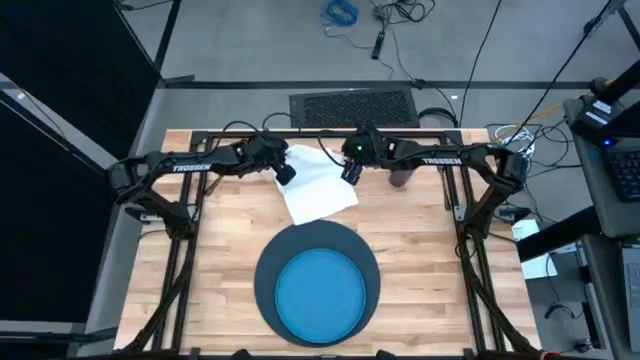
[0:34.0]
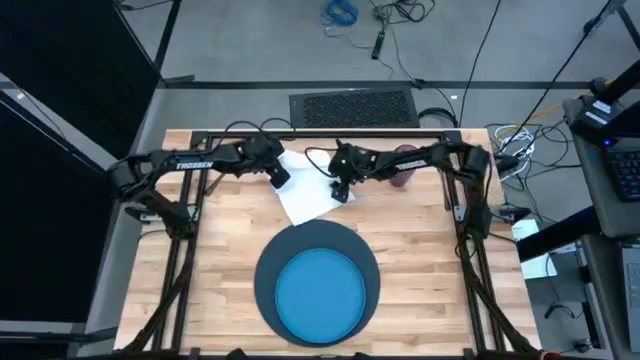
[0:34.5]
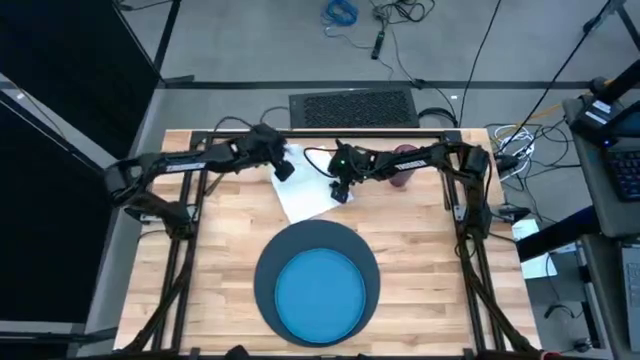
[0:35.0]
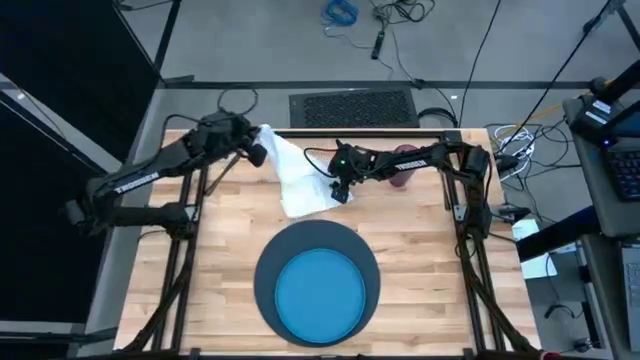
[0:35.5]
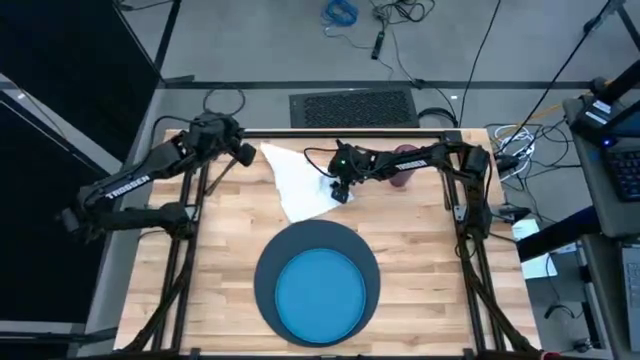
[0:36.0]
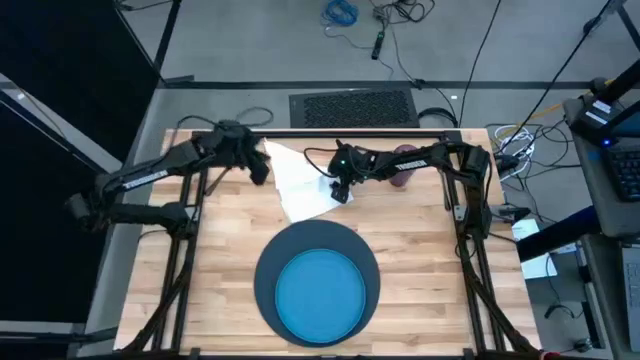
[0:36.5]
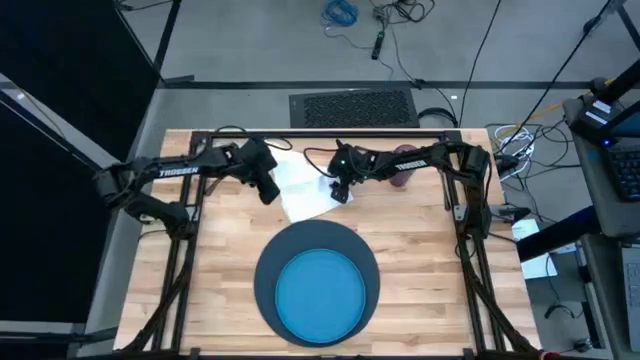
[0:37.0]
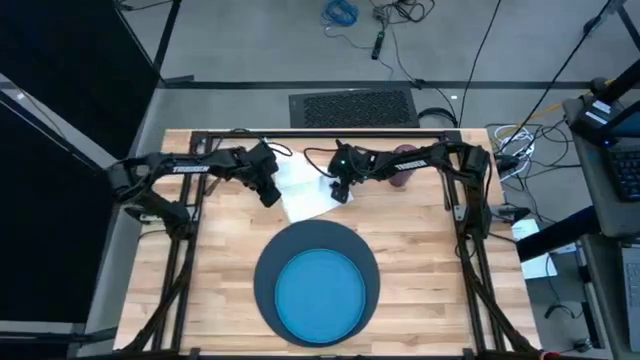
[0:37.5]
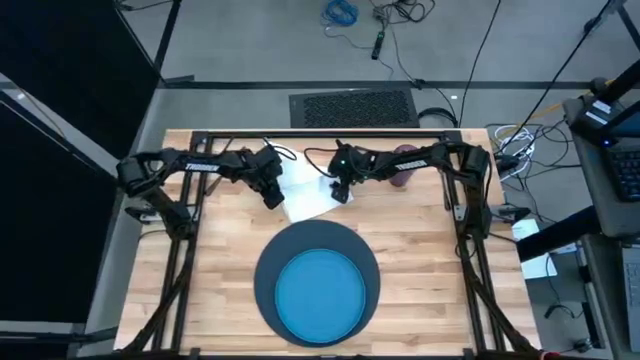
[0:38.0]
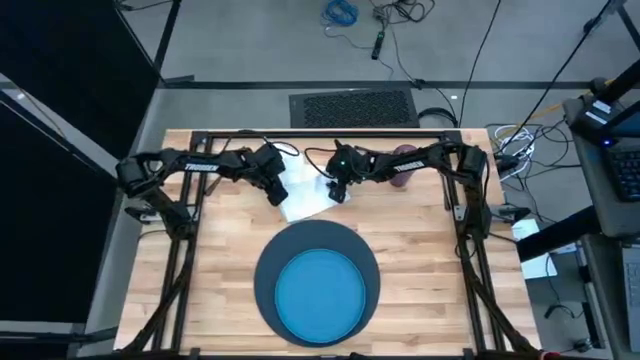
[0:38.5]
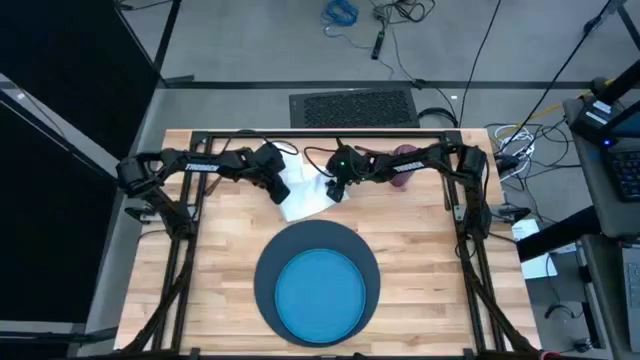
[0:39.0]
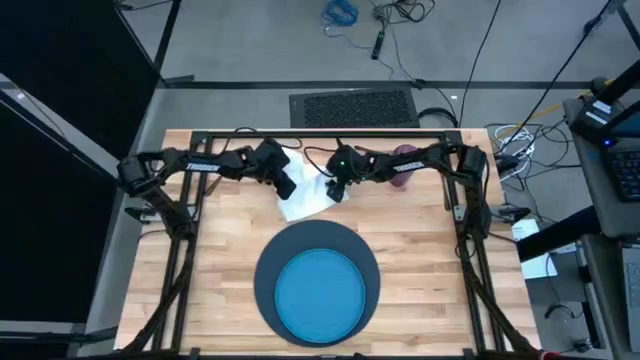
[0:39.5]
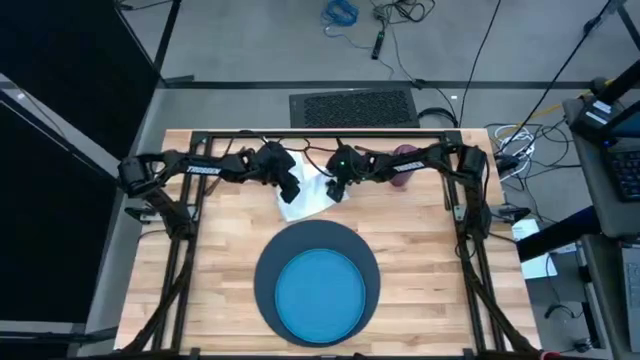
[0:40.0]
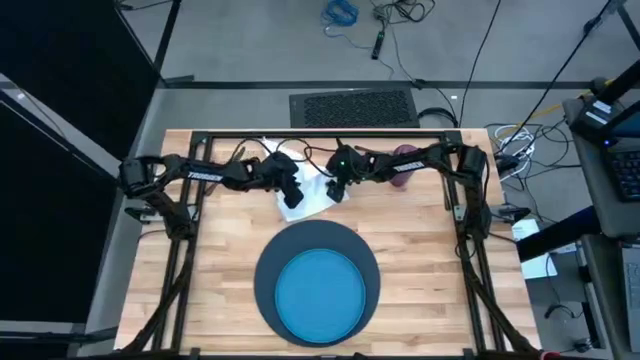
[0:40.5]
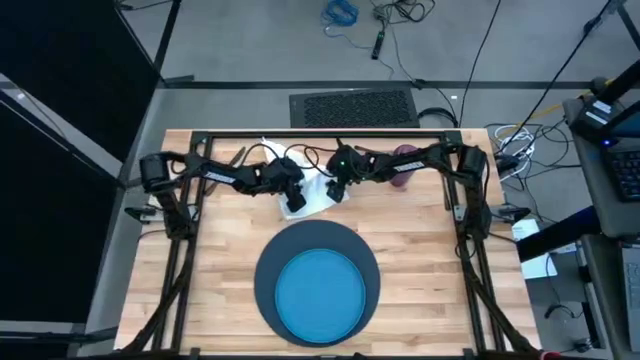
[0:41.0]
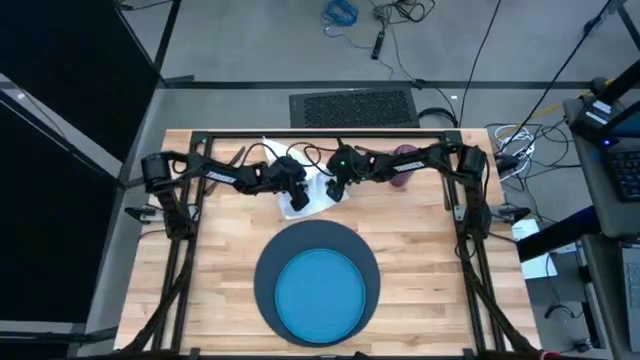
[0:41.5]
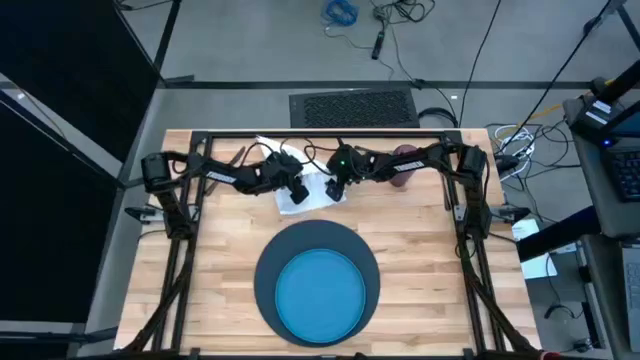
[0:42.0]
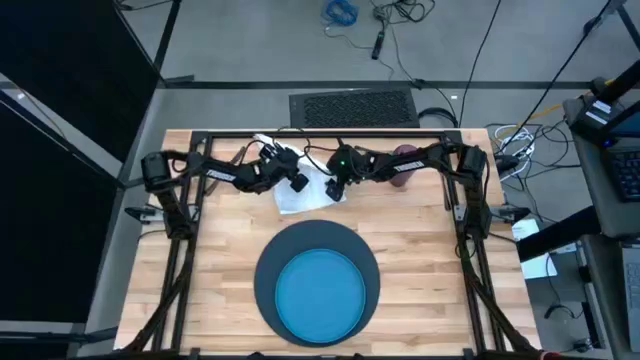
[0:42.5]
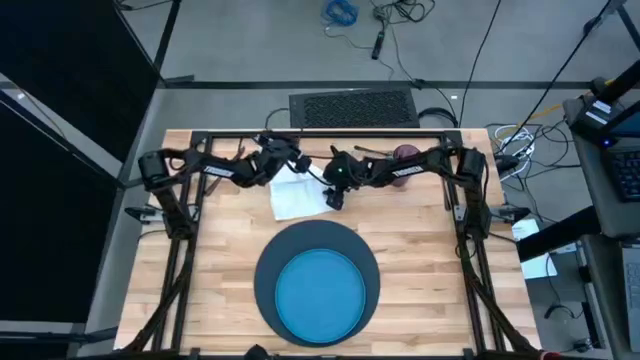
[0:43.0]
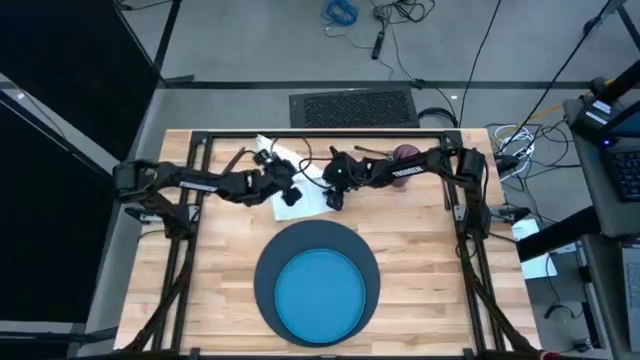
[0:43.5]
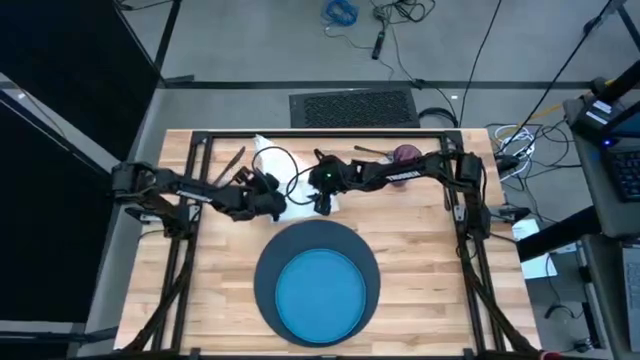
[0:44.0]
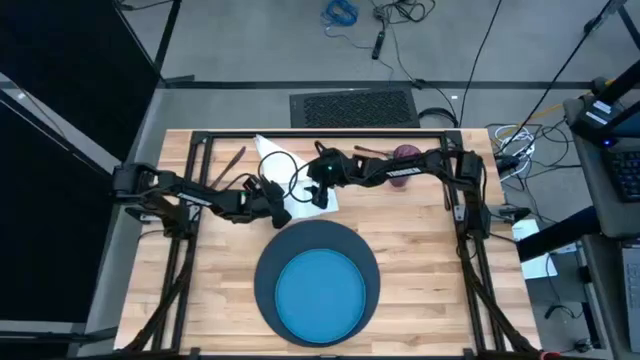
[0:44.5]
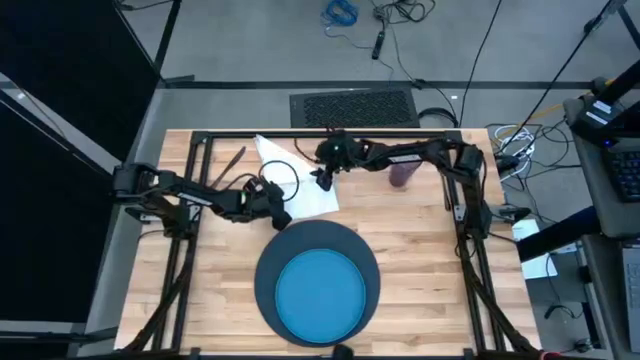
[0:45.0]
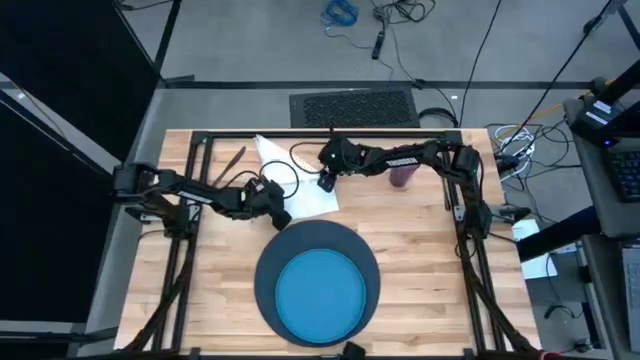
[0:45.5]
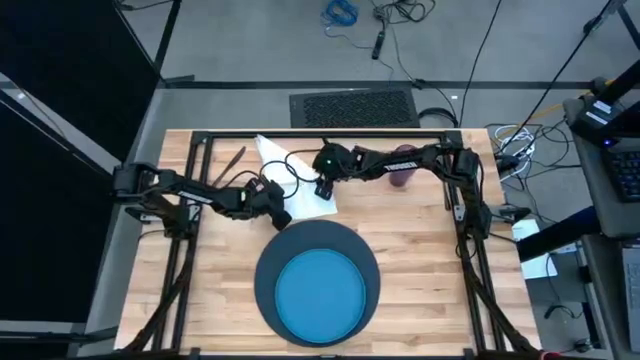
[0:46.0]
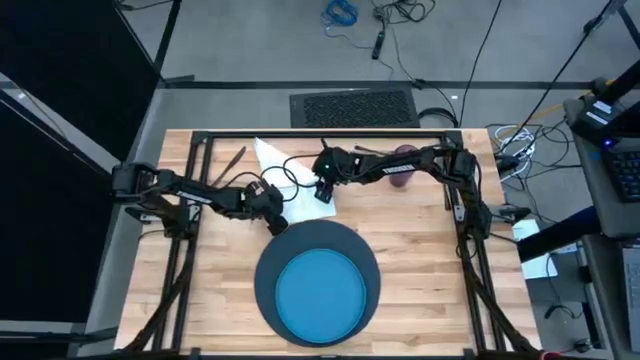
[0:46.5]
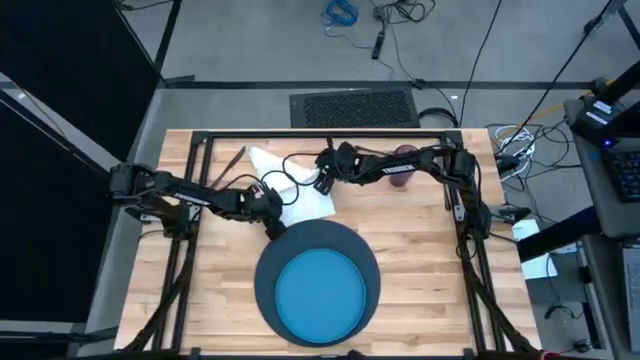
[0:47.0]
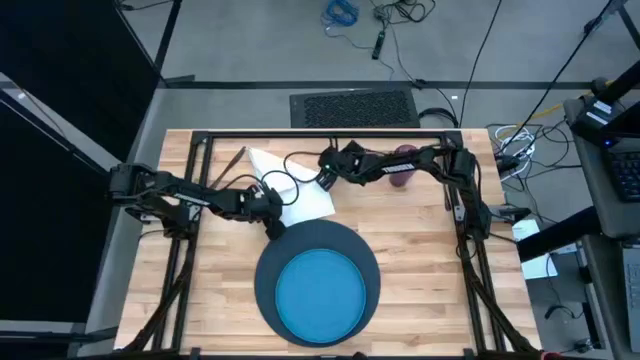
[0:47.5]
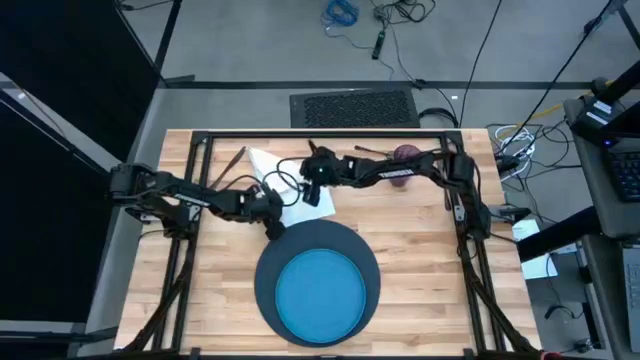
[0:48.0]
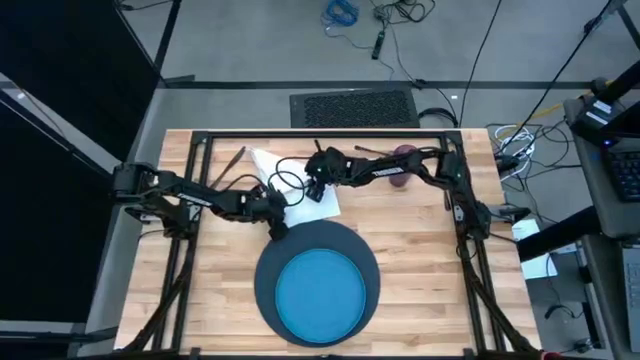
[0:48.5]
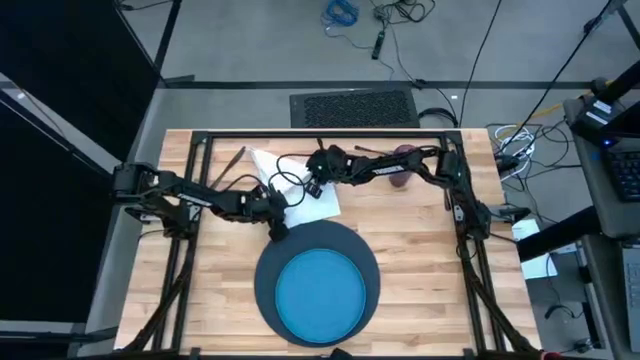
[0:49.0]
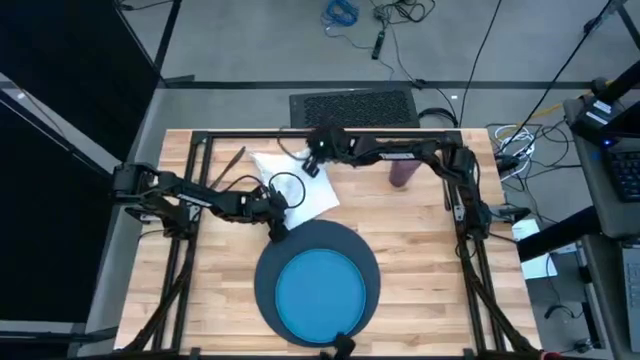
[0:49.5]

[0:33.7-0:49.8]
Task: Set table place
Fold the white napkin

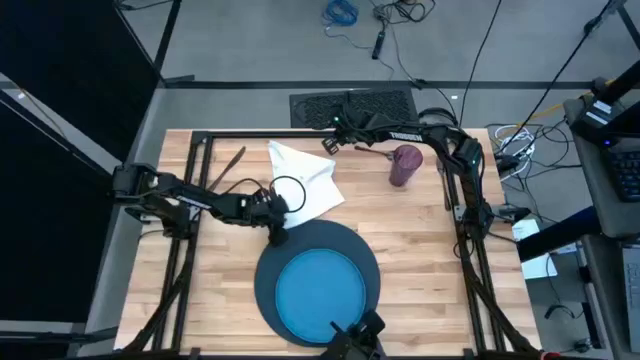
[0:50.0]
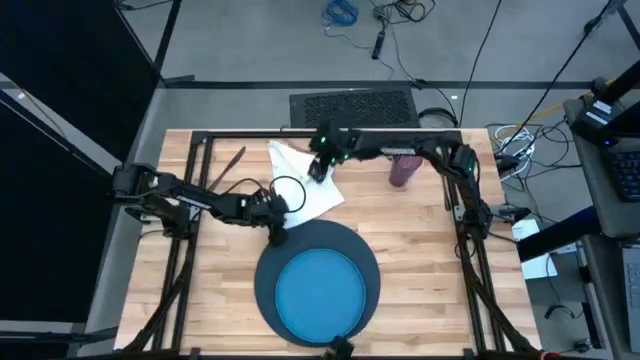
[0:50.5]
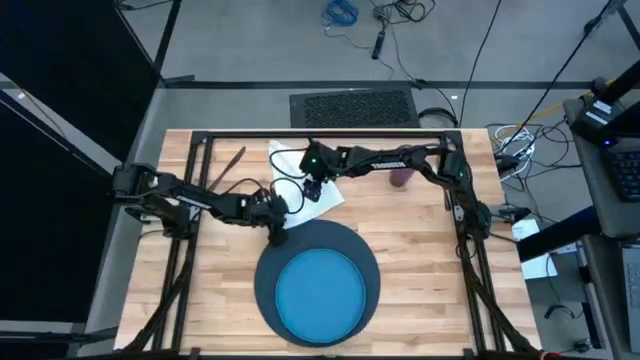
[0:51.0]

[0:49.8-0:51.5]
Fold the white napkin

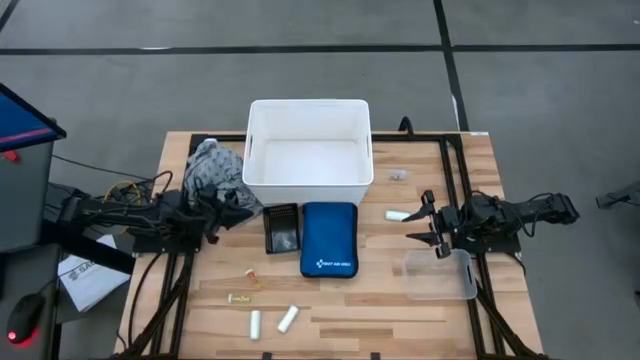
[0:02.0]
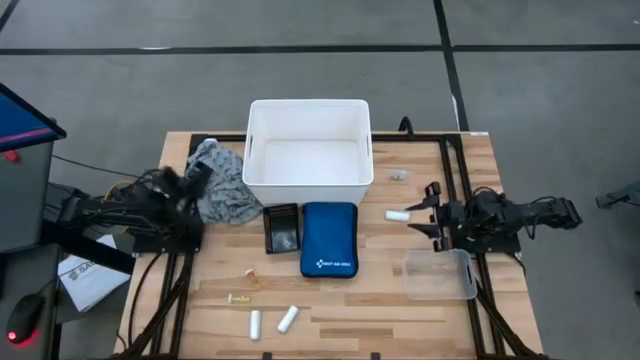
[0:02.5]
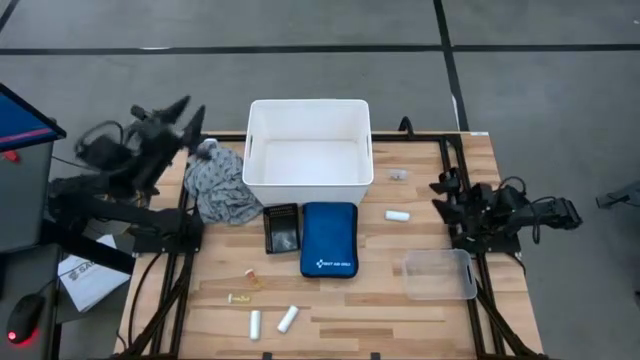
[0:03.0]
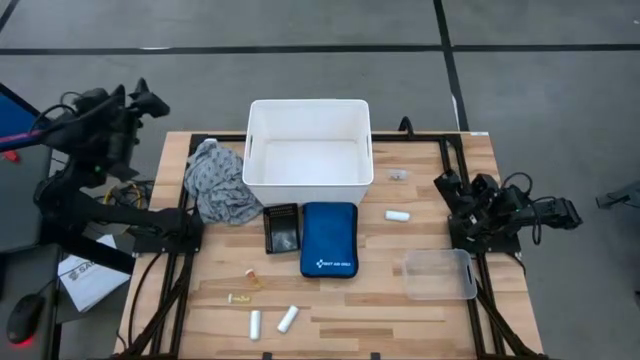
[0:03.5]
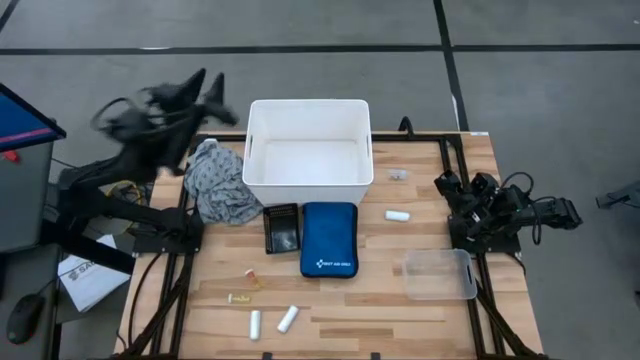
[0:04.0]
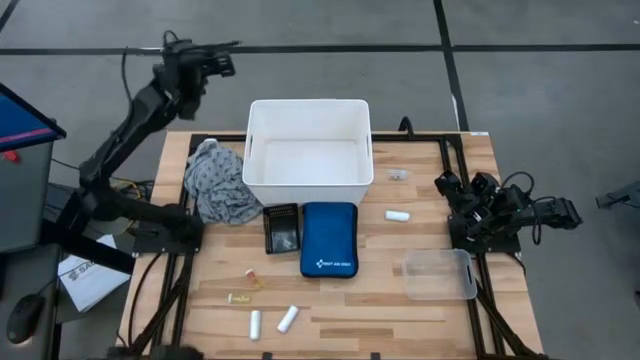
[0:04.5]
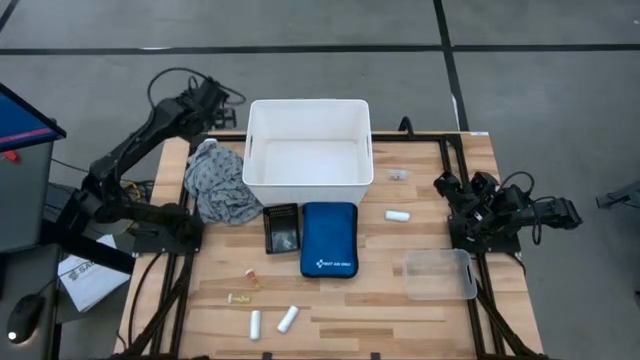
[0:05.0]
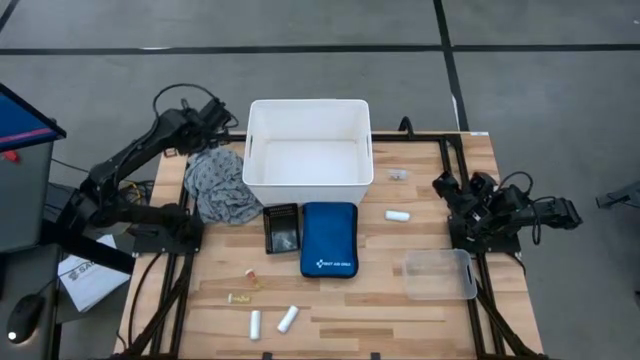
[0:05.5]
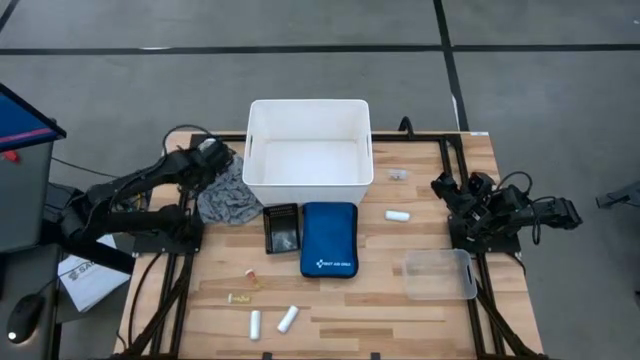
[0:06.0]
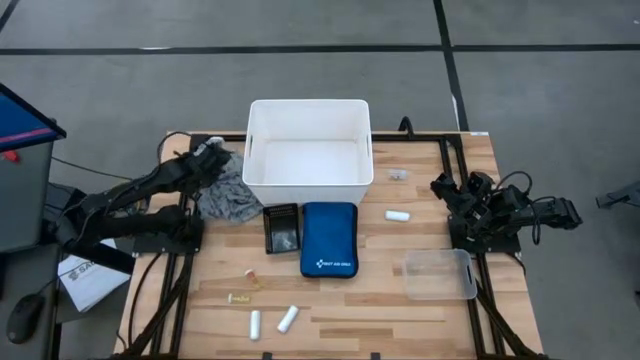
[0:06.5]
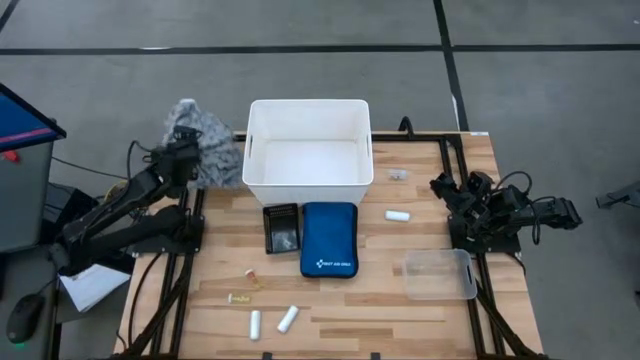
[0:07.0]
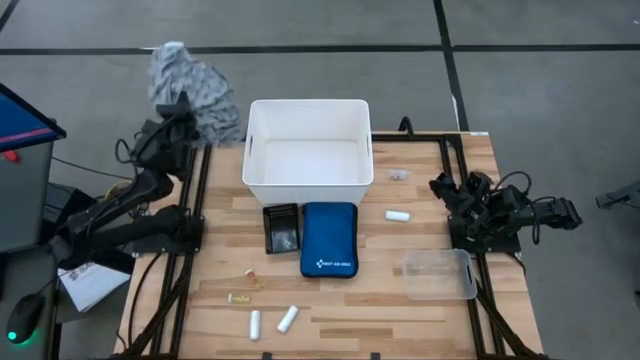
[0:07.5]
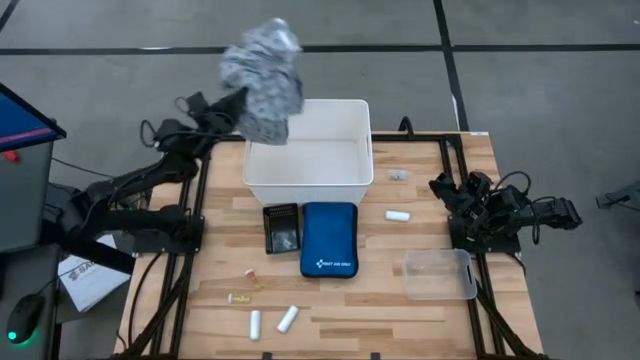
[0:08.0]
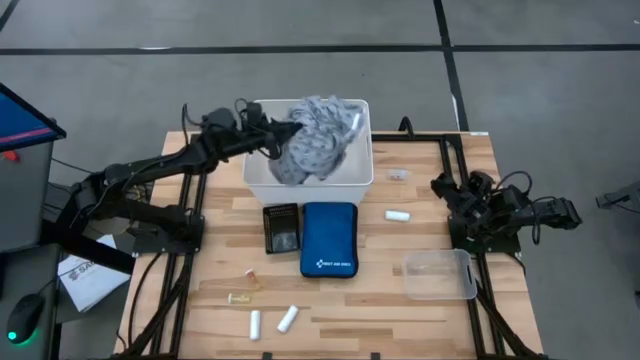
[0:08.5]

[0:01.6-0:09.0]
Task: Pick & place medical supplies in basket/bin
Put the gray patient gown into the white laundry basket
